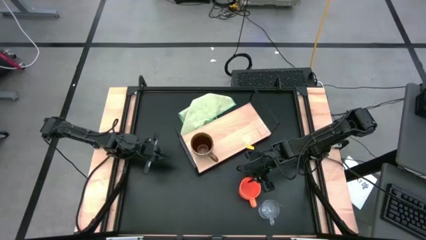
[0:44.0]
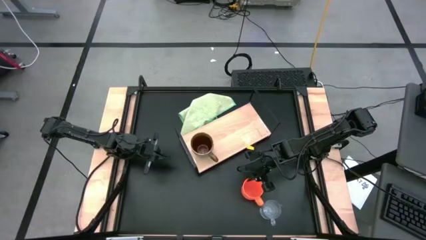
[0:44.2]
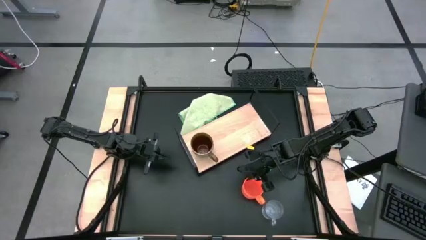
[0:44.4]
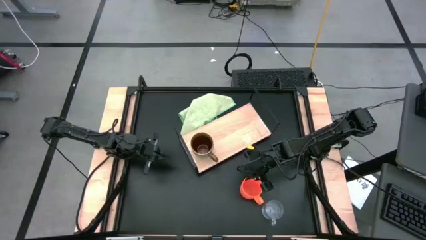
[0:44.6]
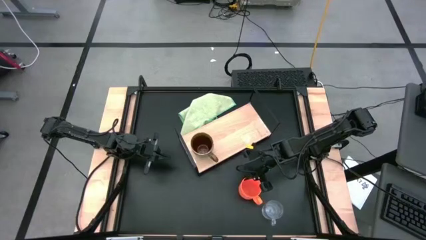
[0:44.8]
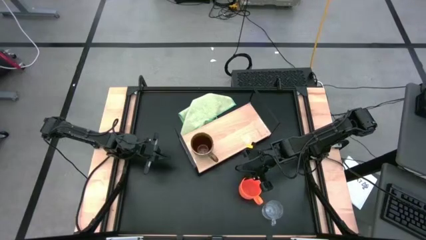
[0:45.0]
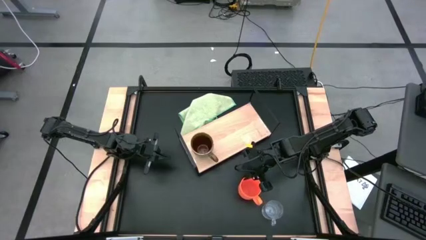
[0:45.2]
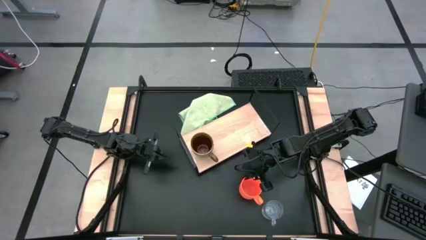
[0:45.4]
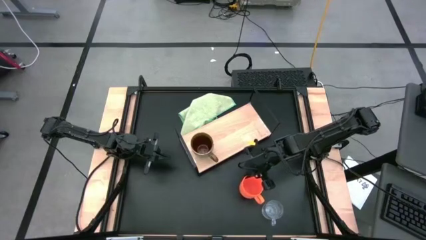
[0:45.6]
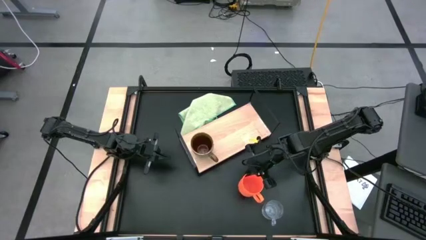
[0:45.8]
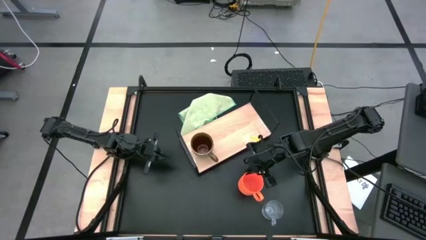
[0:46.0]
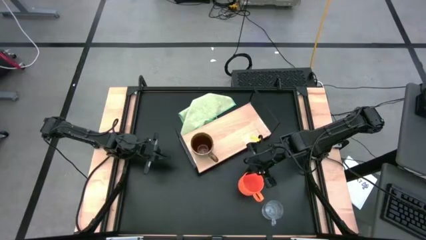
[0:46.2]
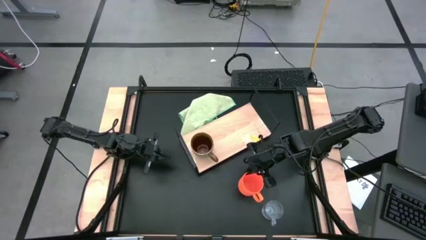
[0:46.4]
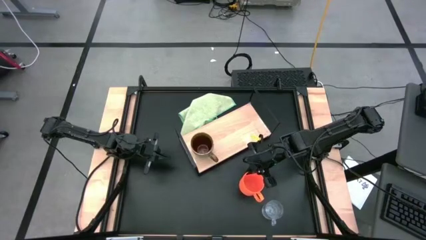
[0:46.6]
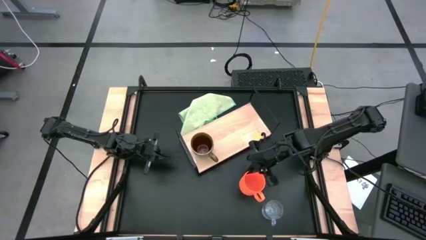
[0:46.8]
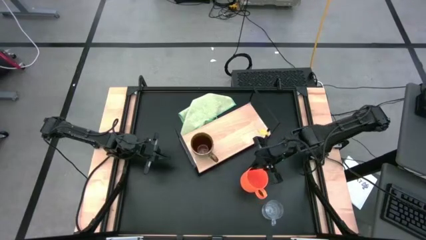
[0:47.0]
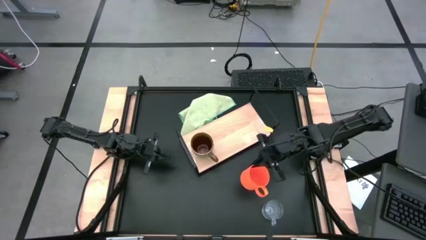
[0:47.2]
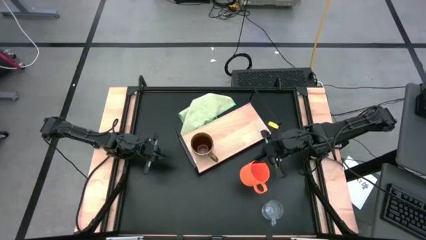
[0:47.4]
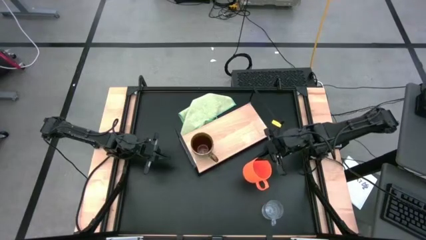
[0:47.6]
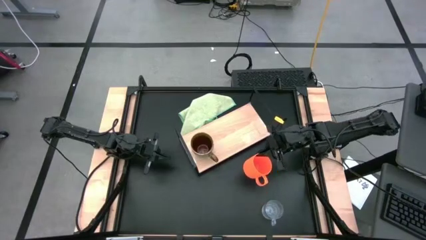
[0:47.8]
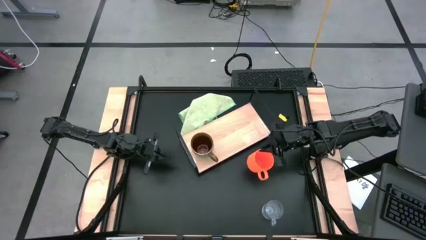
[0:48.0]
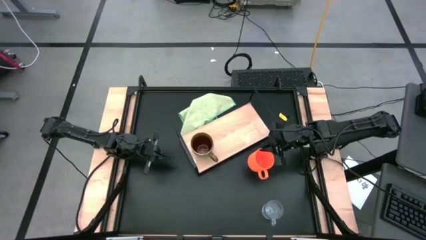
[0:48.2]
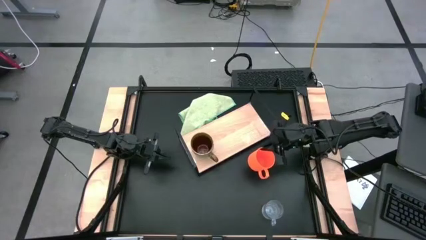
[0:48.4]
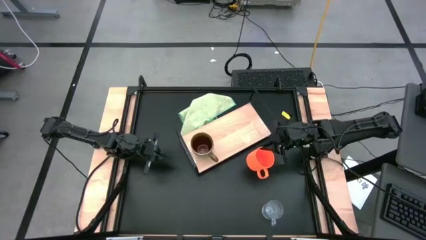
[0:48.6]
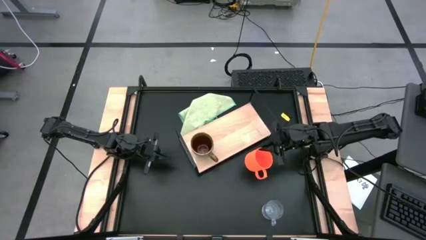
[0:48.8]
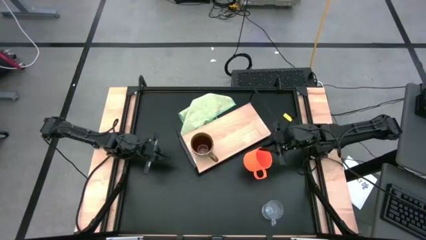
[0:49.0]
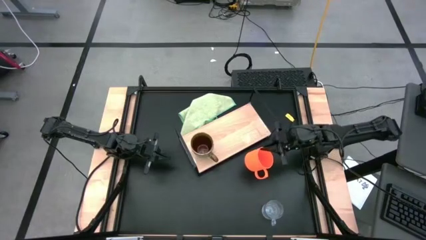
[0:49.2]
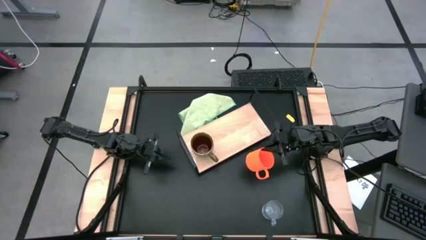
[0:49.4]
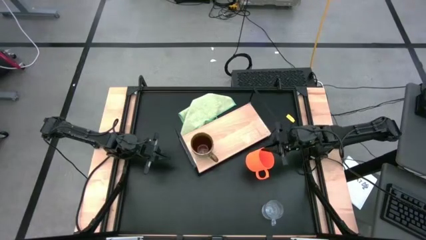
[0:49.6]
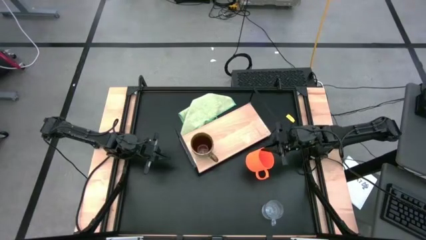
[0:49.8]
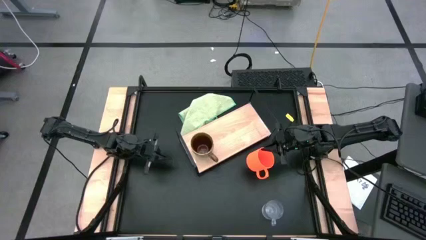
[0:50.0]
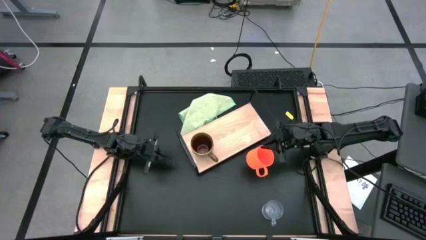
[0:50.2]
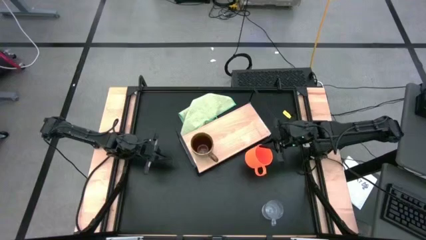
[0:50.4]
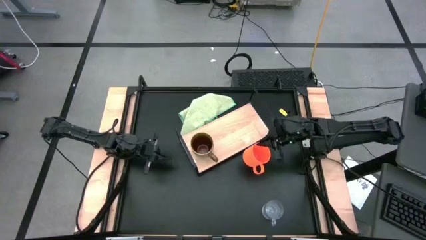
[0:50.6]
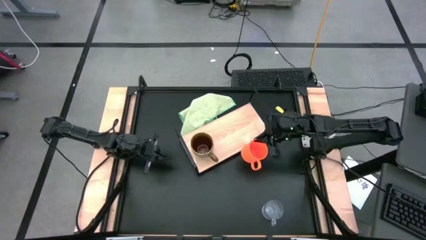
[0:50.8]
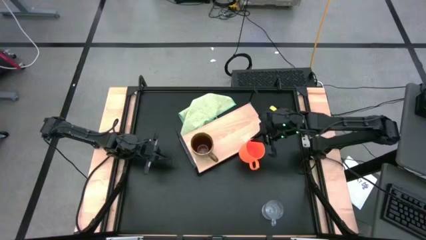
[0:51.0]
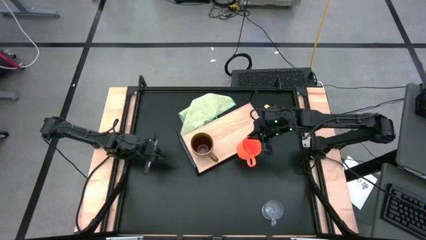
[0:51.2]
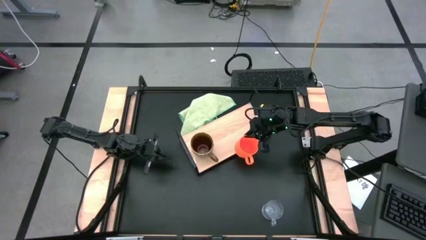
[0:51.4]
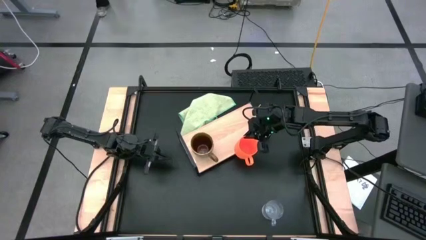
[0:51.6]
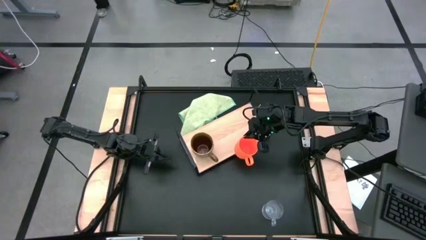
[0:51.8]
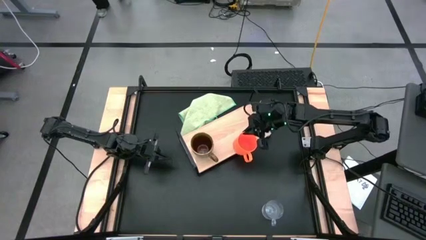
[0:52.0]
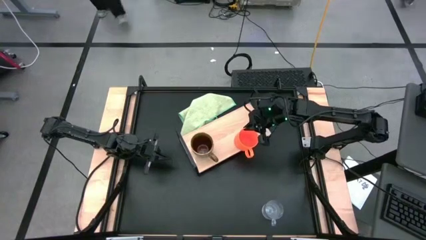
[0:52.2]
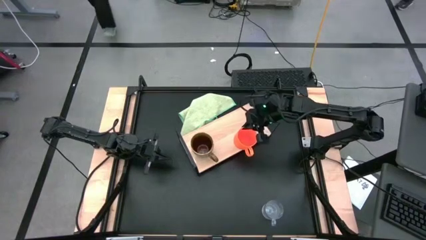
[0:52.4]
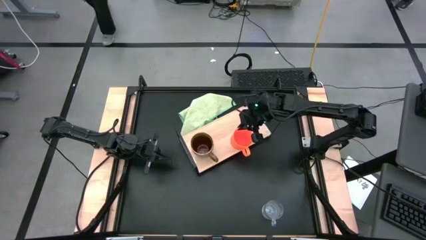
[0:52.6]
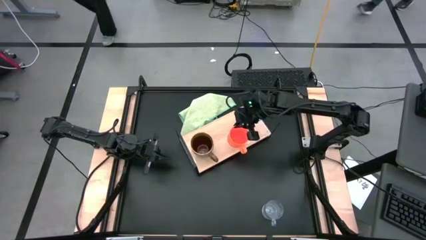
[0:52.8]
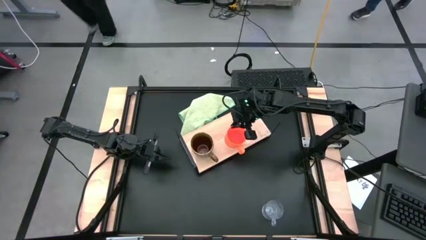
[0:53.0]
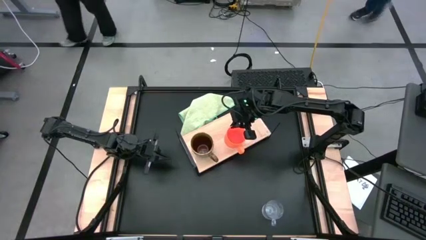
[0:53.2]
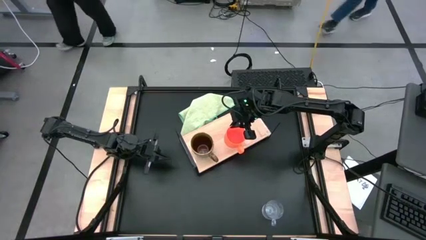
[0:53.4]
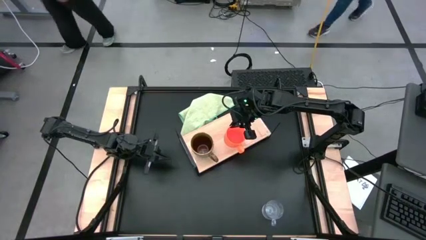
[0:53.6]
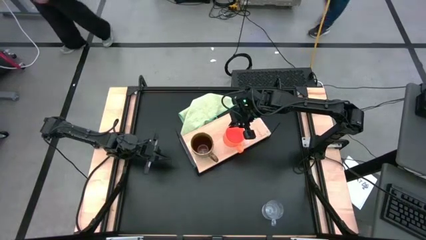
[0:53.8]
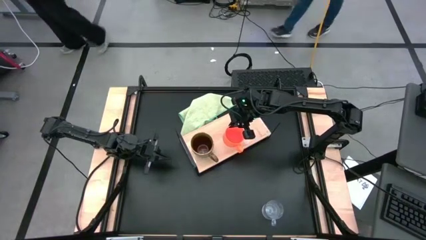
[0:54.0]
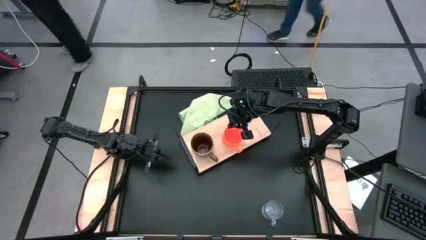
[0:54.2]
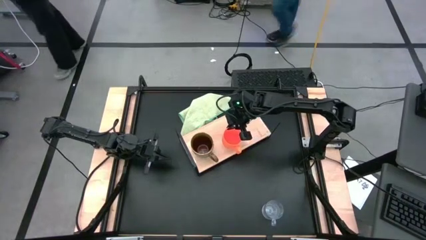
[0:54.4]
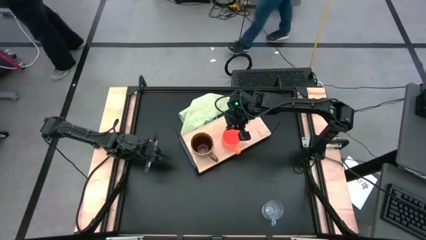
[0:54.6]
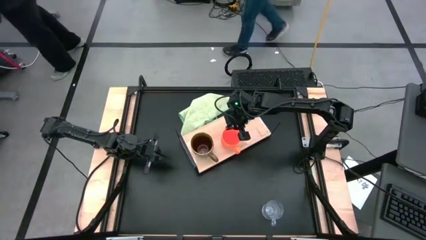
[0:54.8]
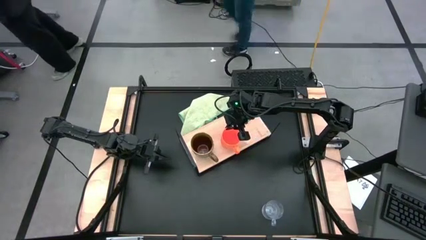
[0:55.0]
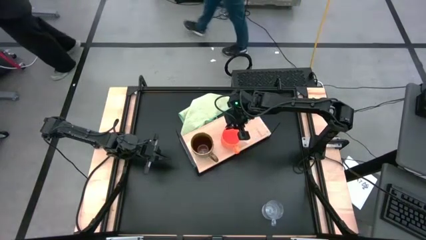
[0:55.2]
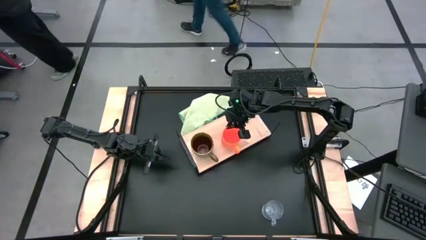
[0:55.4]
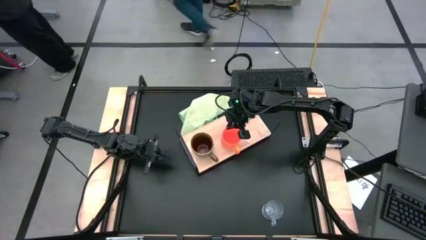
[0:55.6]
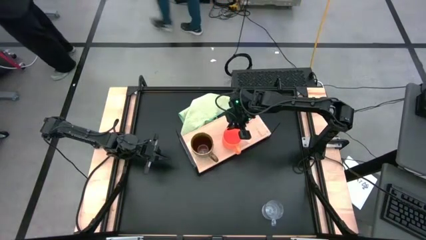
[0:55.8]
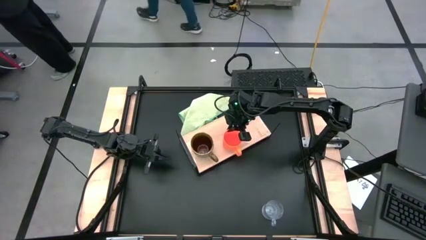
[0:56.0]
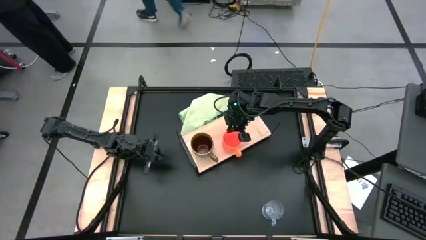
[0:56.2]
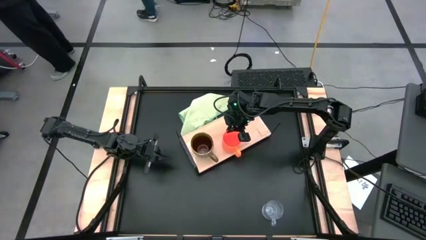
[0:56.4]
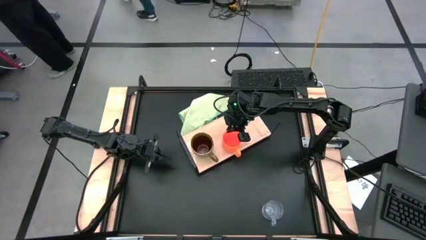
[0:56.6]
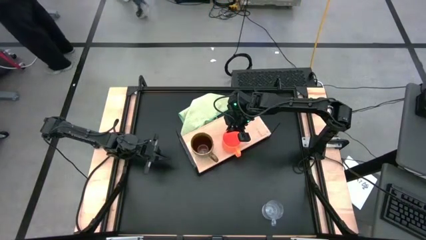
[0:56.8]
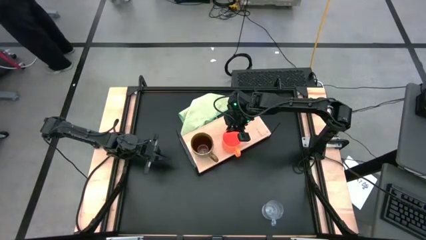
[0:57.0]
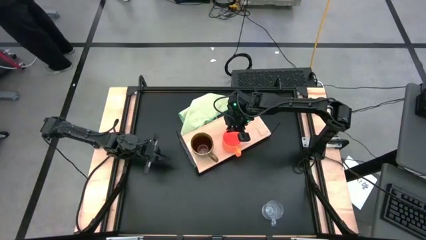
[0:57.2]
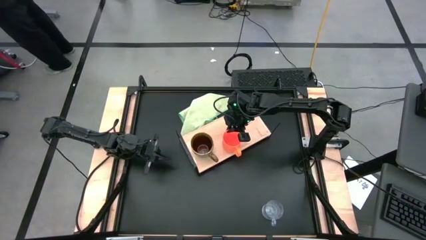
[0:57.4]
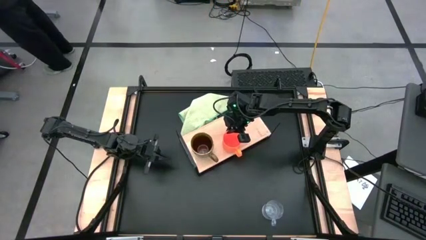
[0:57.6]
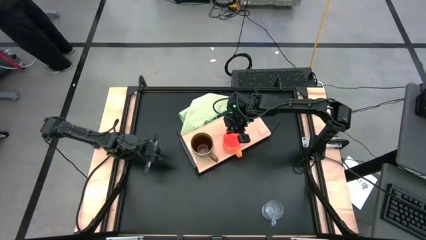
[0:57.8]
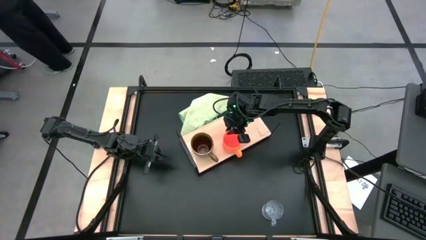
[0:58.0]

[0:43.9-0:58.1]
Task: Stack small to large cups/mugs on shelf
Put the orange mug on the shelf

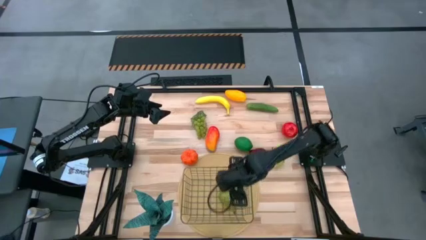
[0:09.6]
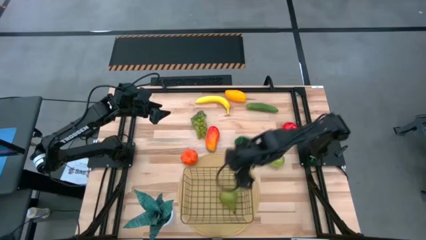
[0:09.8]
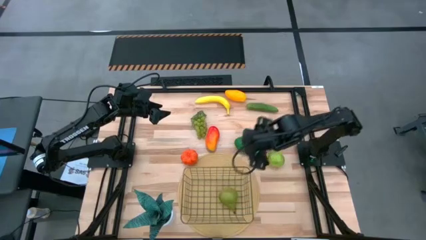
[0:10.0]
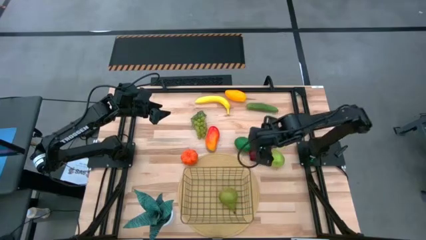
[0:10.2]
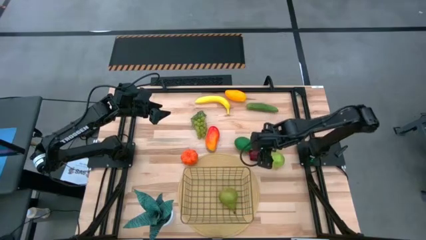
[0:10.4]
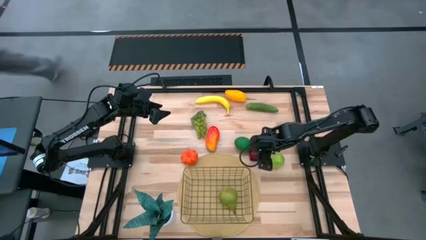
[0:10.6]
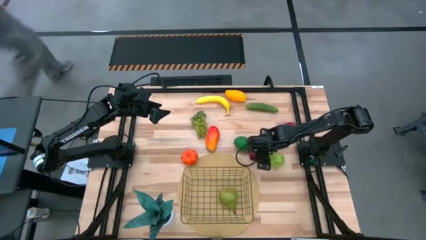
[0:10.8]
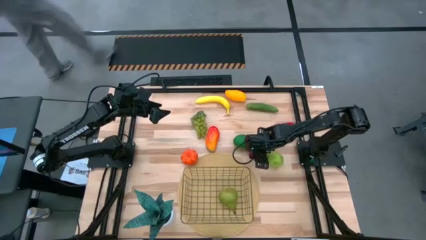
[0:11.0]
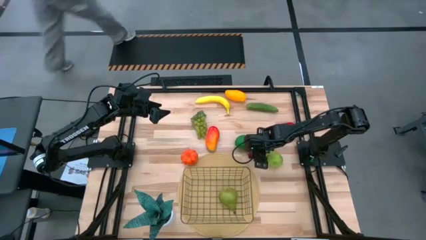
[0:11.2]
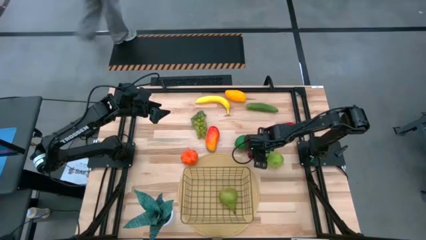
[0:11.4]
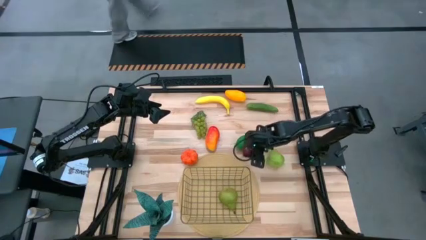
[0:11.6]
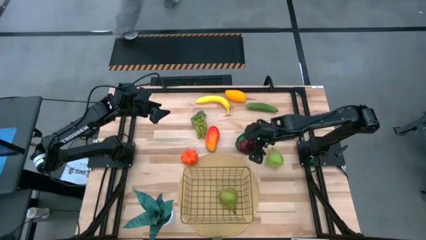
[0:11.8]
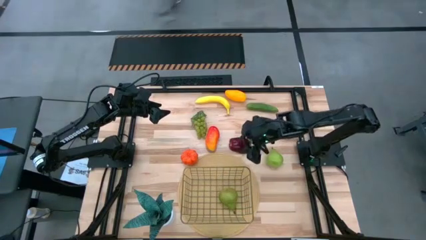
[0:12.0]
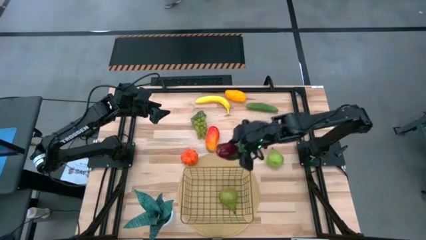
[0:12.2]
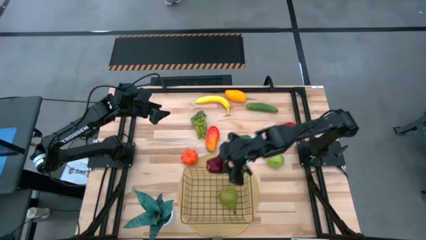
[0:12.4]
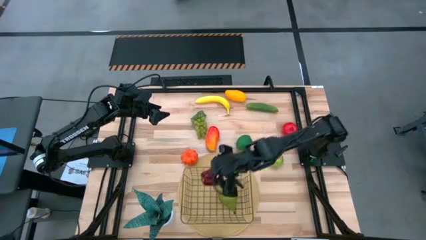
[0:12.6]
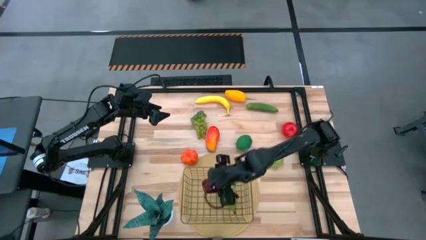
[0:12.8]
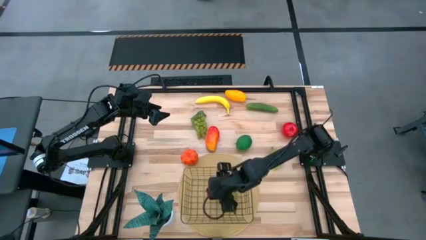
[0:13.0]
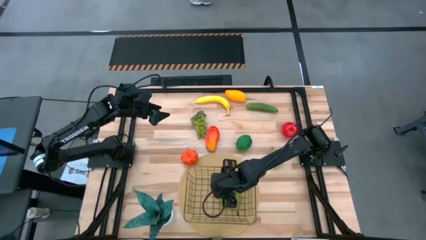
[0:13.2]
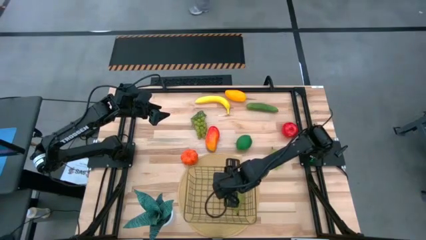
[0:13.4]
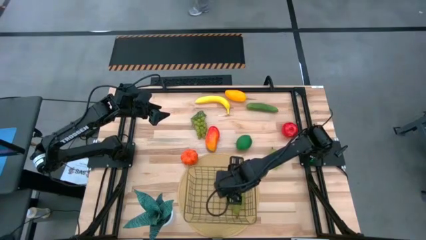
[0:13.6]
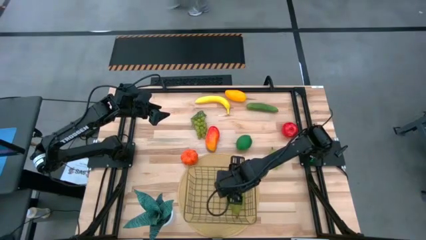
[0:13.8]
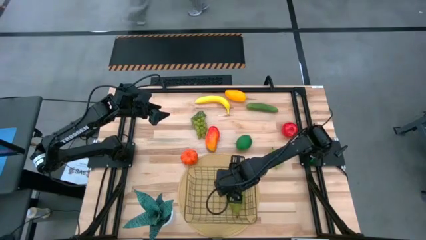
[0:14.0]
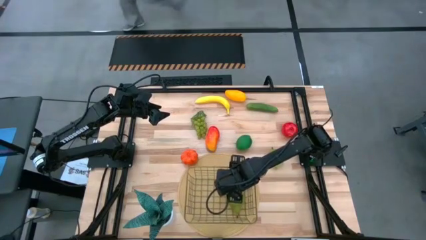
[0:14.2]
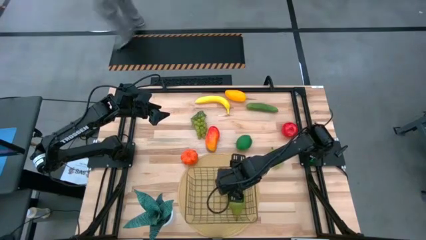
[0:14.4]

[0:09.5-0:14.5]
Task: Build produce basket
Put the dark red apple into the wire basket
